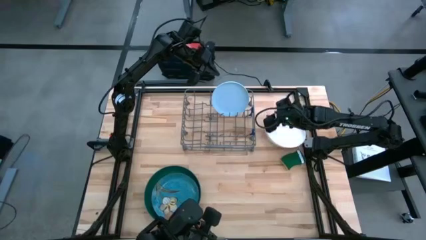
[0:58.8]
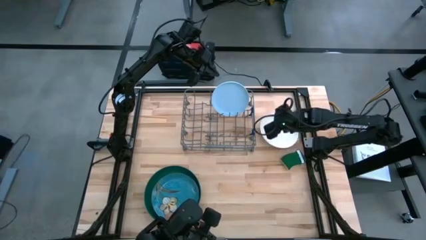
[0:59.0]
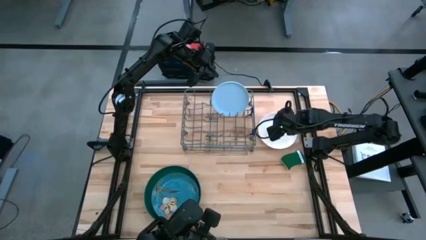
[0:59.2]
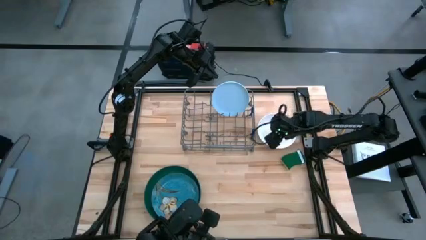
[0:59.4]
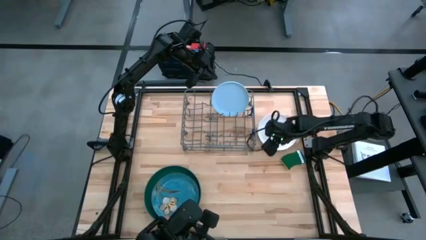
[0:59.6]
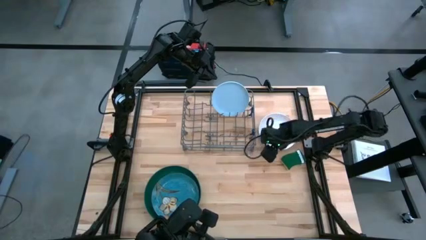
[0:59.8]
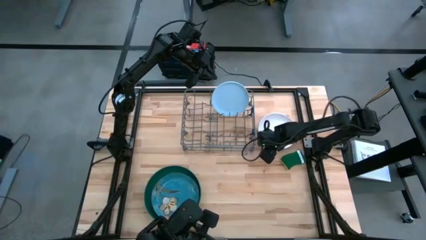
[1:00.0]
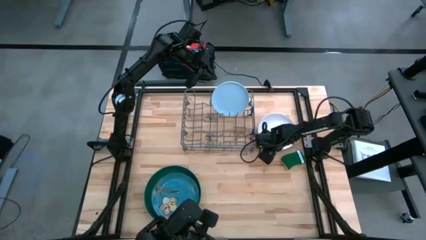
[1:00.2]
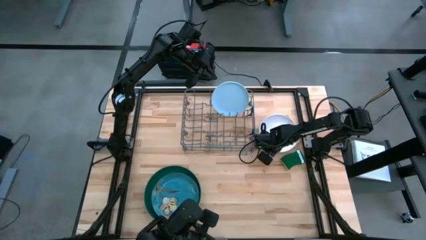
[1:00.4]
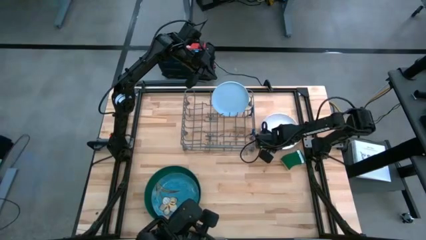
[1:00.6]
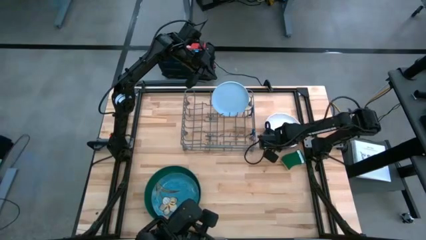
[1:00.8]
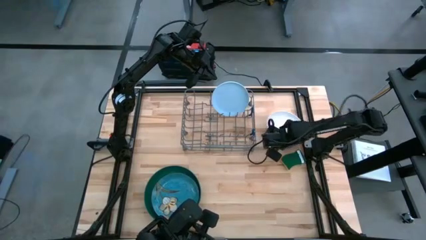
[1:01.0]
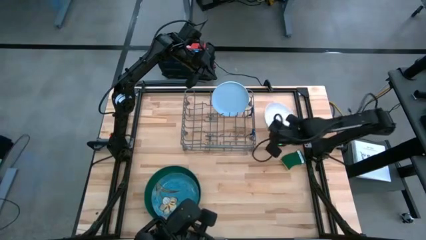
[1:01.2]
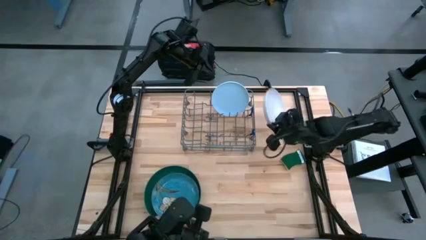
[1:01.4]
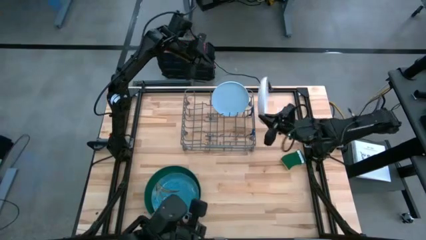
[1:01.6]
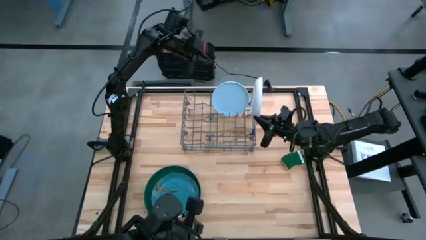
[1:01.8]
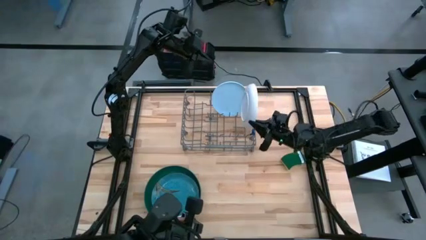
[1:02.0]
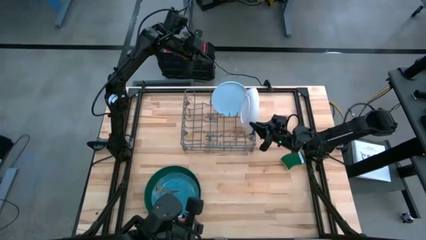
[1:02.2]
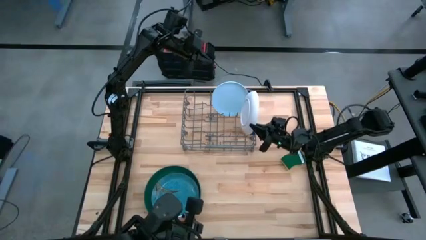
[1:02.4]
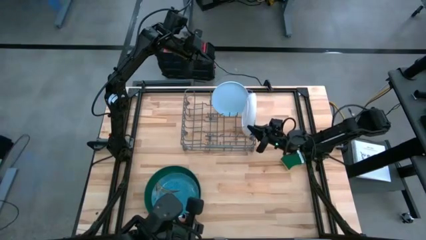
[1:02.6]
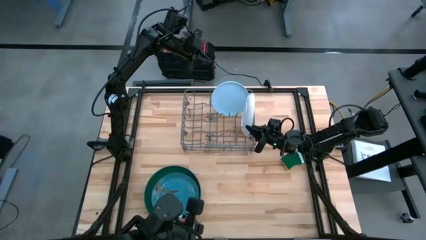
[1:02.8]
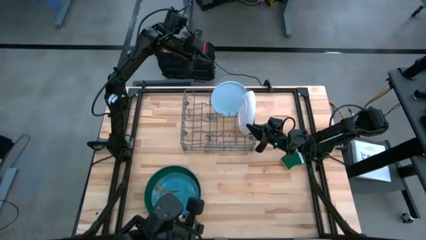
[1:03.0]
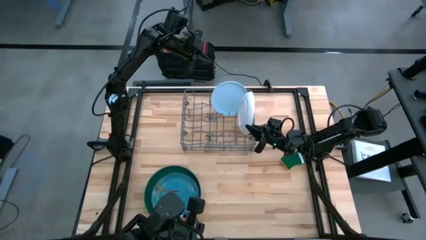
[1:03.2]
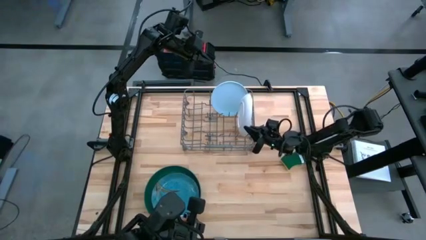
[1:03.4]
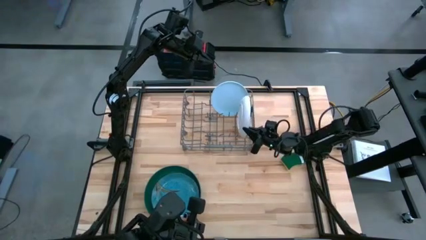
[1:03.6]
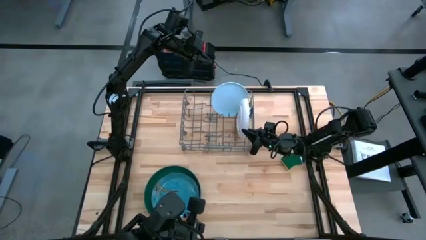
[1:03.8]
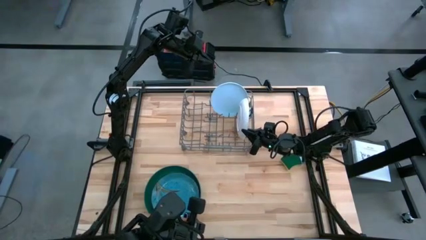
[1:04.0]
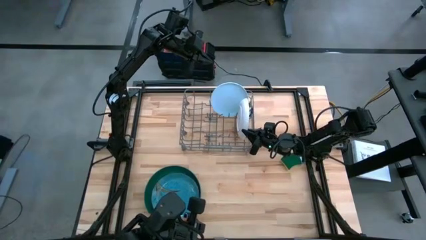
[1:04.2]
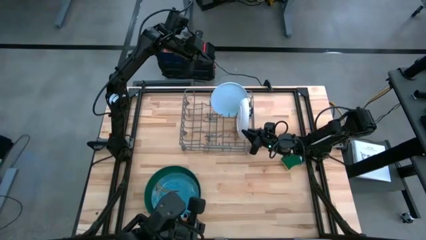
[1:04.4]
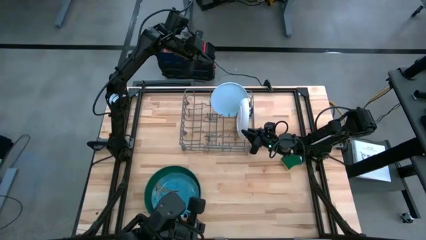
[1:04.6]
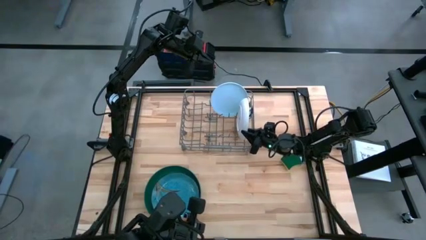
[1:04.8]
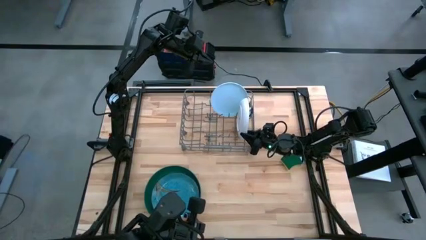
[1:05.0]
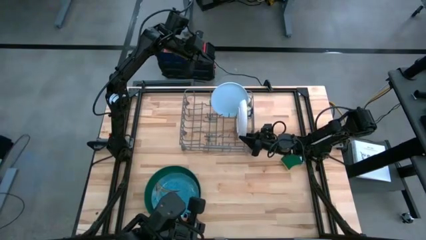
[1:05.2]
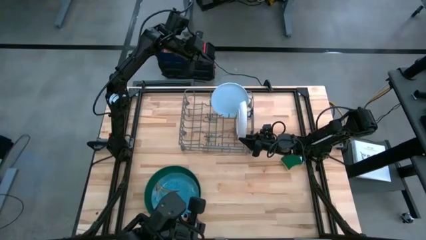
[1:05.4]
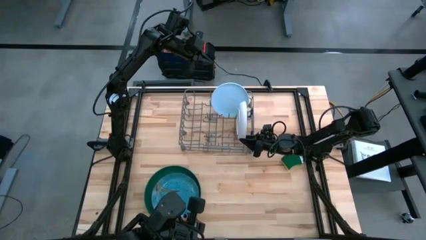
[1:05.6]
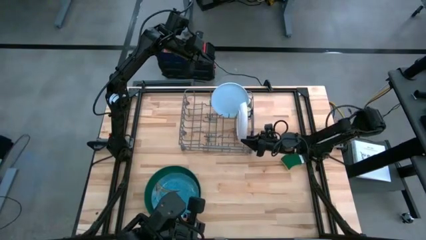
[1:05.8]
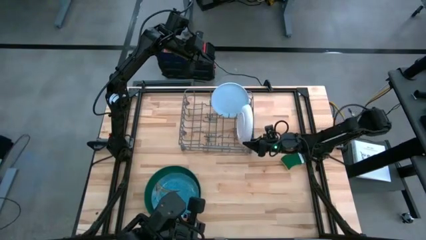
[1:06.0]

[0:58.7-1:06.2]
Task: Sort dishes
Put the white plate in the dishwasher rack

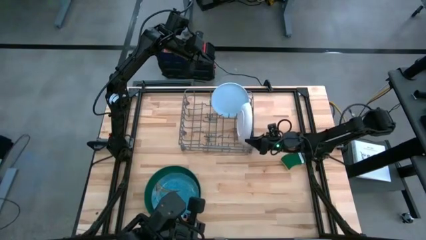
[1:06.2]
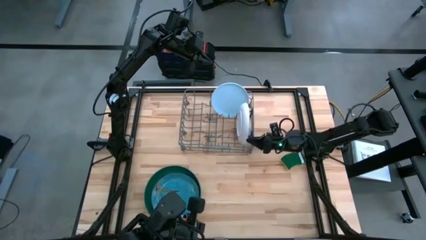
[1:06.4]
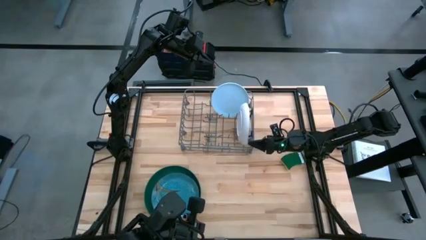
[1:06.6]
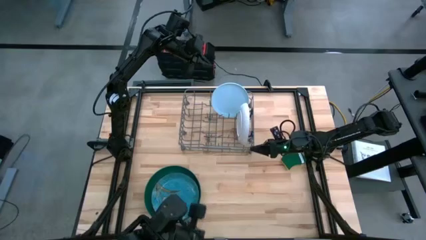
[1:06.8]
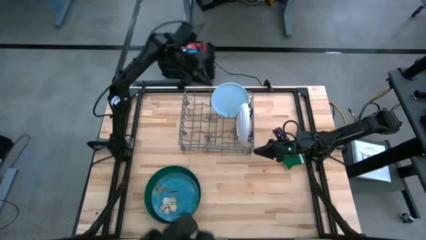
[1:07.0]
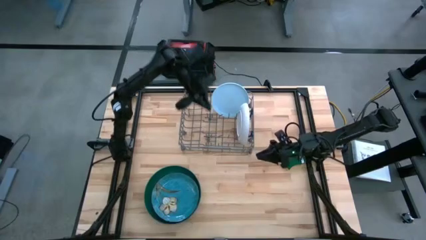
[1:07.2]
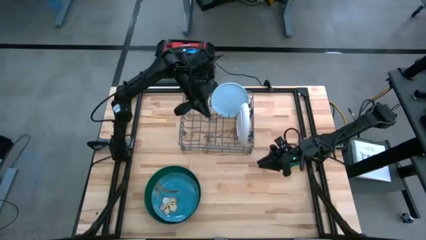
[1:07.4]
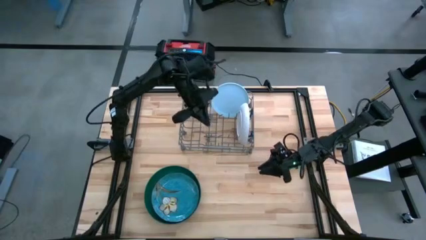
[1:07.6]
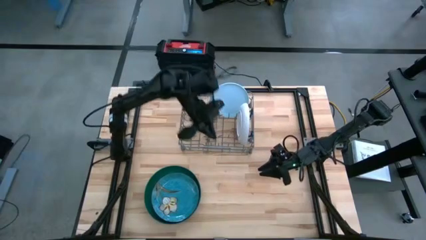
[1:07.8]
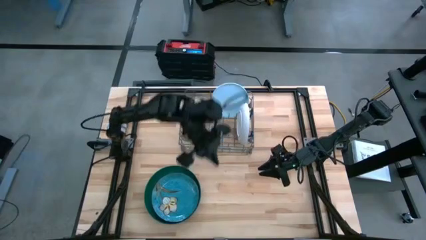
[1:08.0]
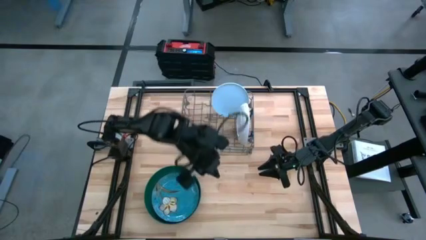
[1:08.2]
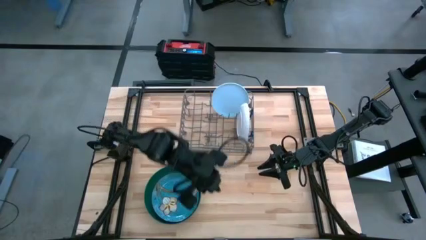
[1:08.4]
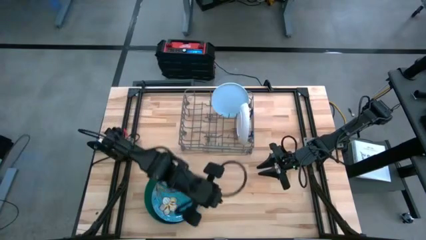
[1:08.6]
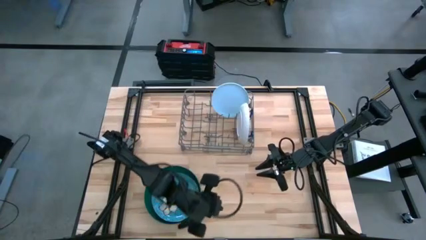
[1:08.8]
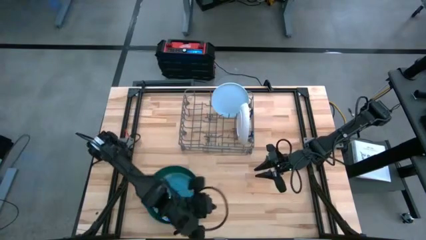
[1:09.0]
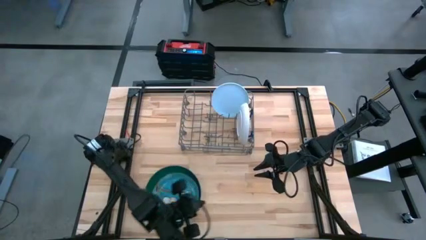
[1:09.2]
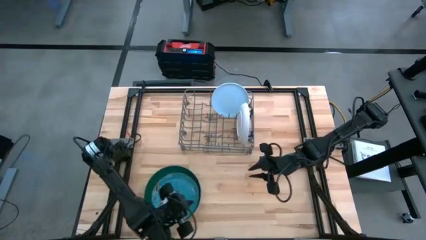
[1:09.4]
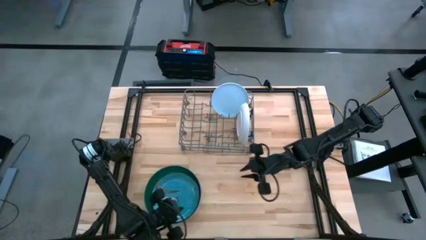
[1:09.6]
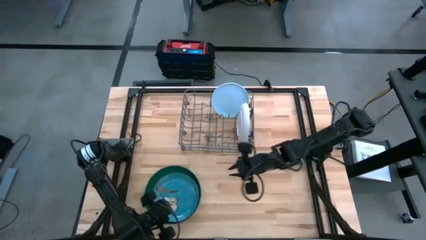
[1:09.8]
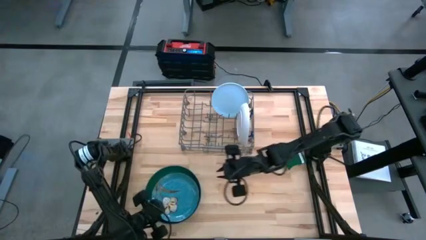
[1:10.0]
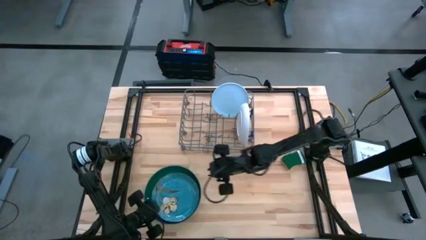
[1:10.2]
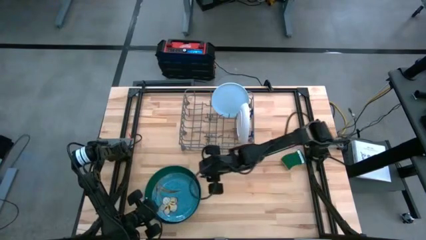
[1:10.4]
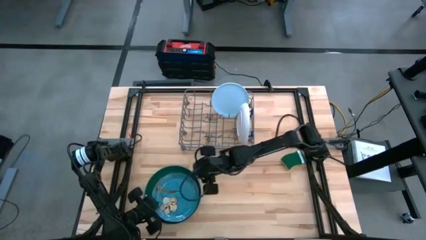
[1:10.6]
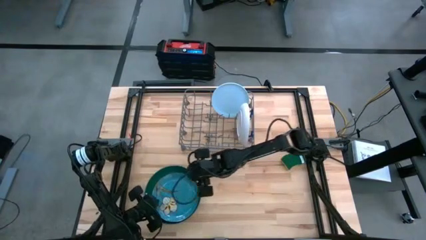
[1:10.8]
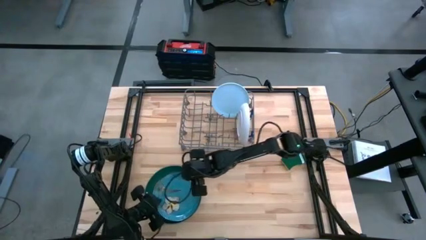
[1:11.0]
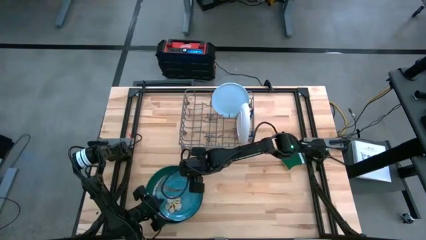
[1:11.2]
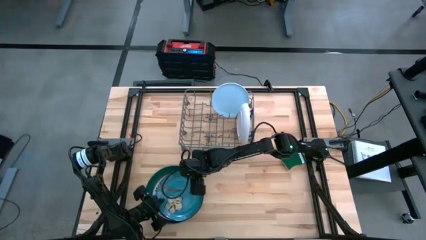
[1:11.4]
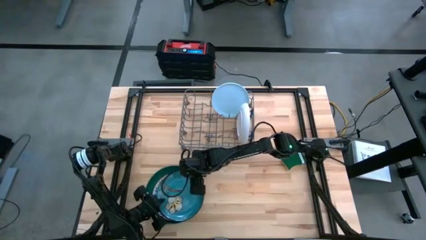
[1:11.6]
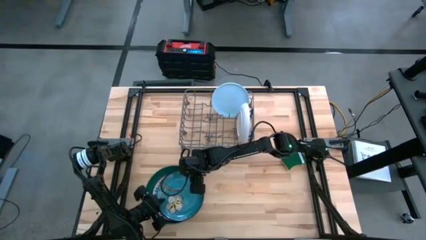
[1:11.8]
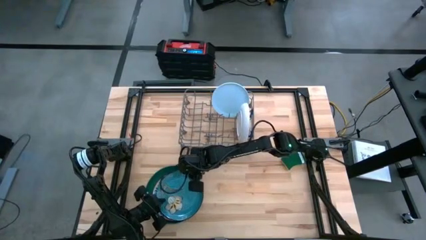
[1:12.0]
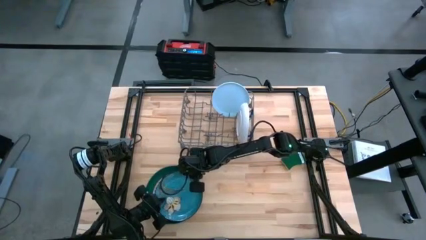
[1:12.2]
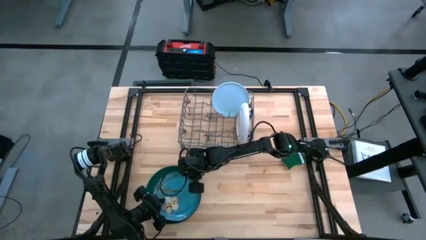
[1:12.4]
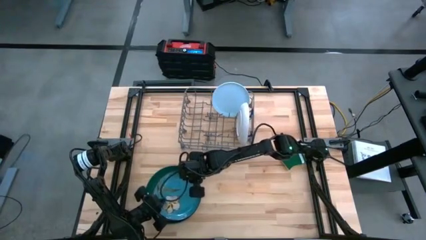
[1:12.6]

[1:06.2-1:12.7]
Put the blue plate in the dishwasher rack

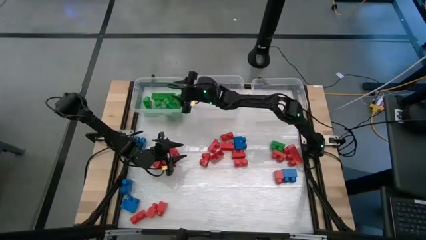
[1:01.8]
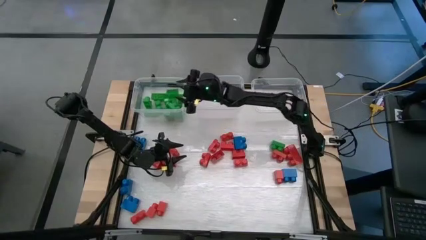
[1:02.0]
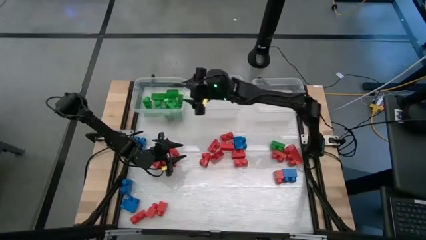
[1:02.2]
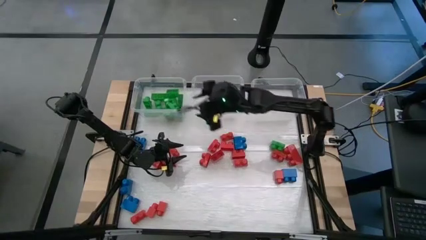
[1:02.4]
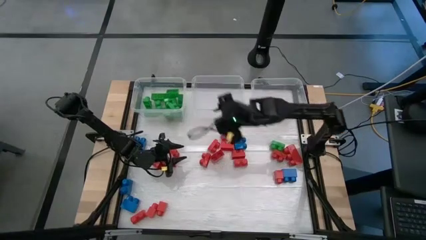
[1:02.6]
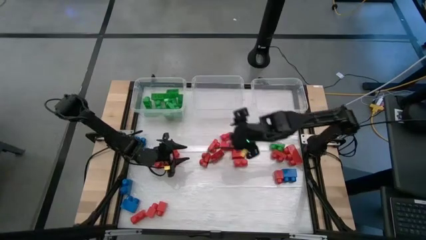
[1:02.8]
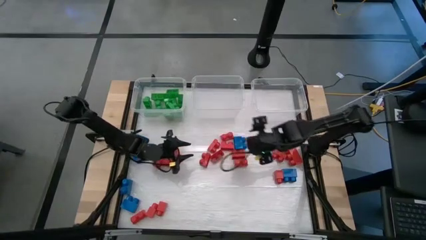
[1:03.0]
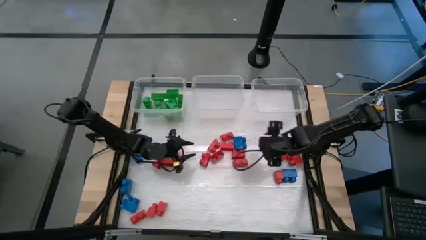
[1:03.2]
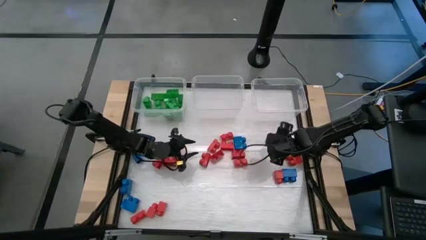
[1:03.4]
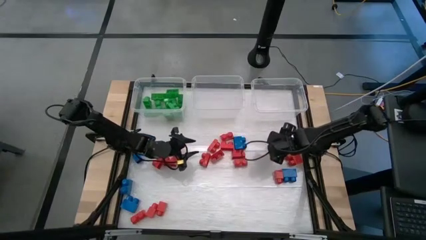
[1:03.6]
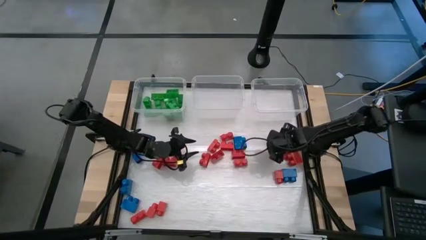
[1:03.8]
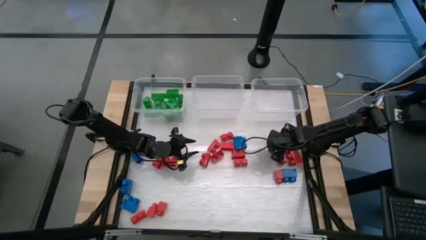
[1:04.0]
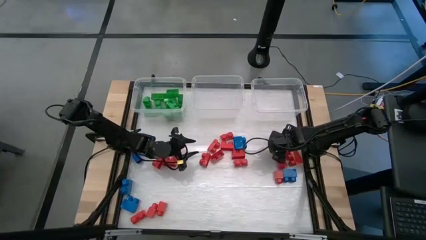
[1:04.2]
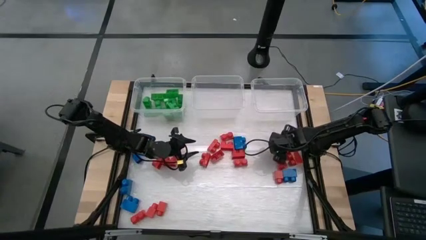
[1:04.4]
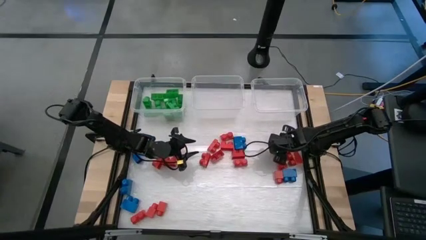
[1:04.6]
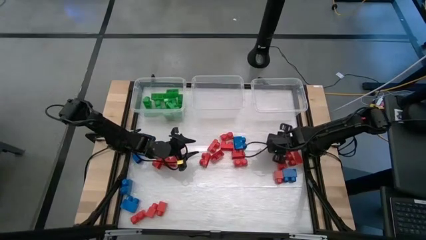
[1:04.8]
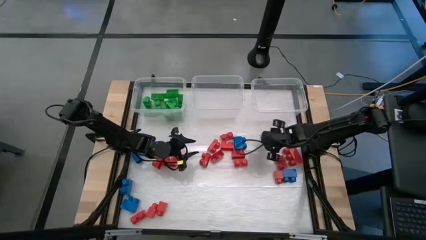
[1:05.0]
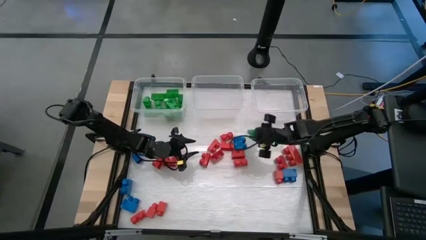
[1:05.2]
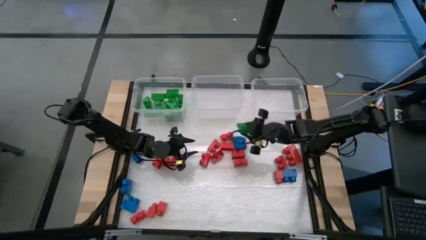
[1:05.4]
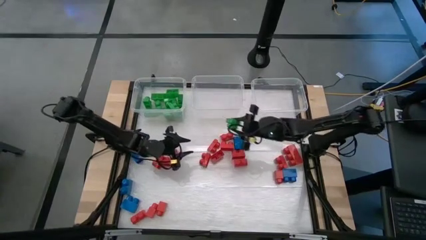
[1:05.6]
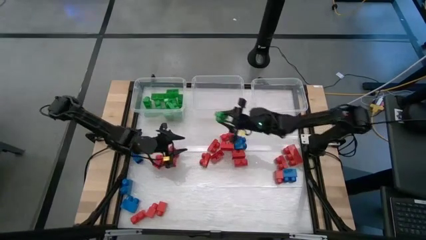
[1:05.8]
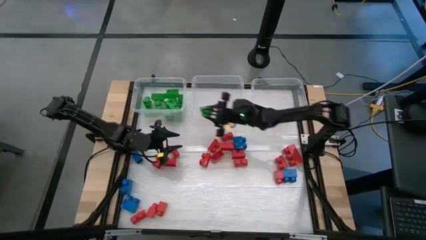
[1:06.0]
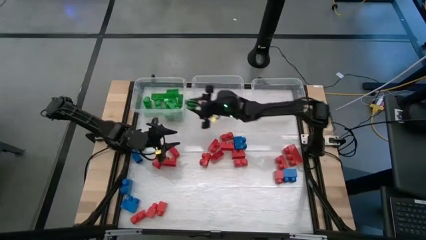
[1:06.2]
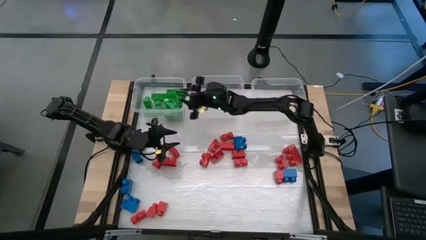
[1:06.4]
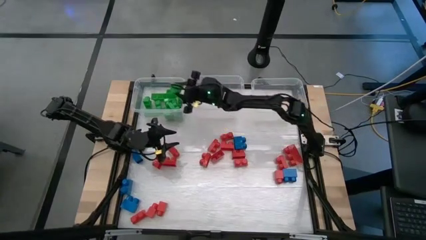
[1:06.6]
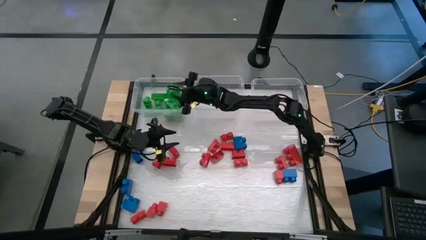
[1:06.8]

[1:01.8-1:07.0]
Task: Sort blocks
Put the green game piece into the left transparent bin
